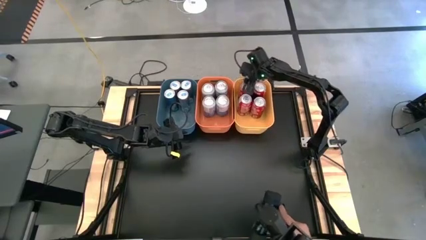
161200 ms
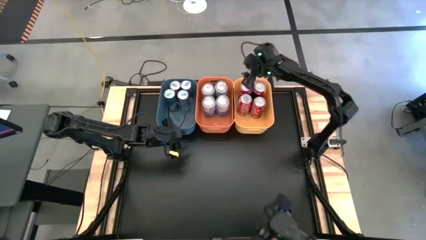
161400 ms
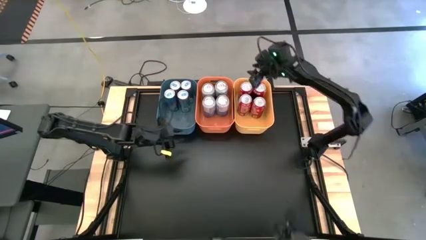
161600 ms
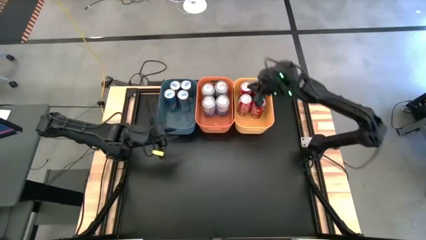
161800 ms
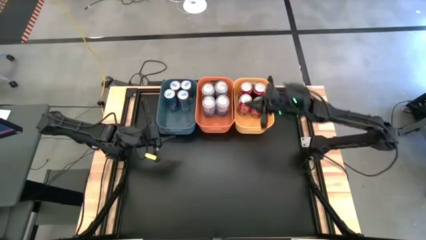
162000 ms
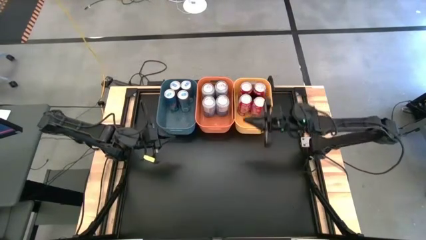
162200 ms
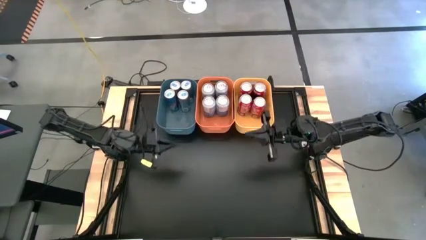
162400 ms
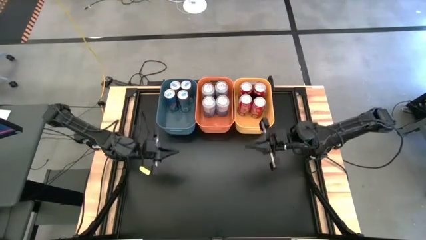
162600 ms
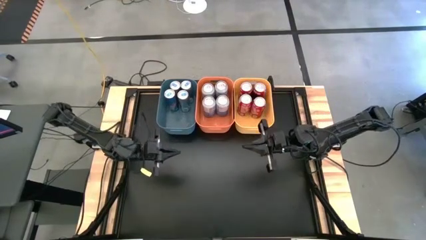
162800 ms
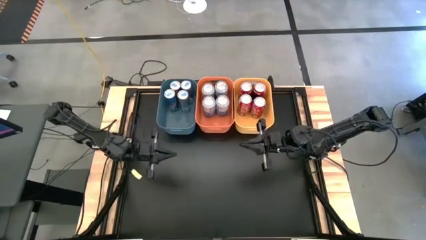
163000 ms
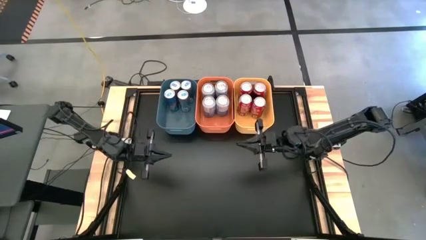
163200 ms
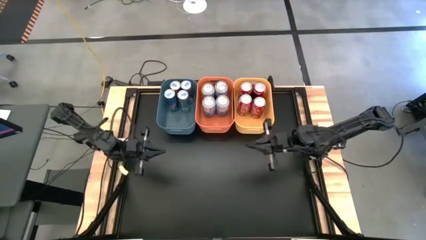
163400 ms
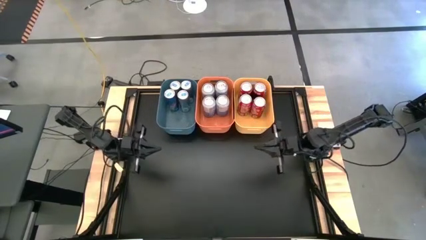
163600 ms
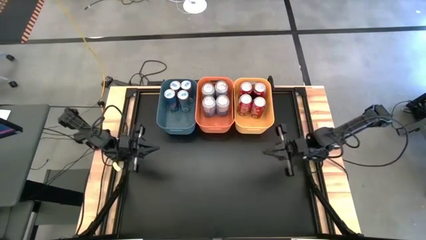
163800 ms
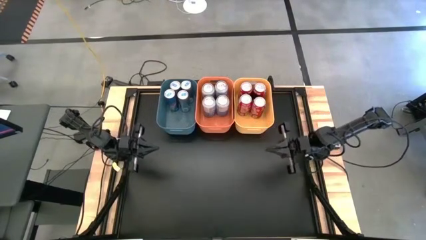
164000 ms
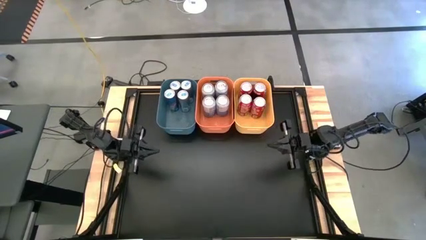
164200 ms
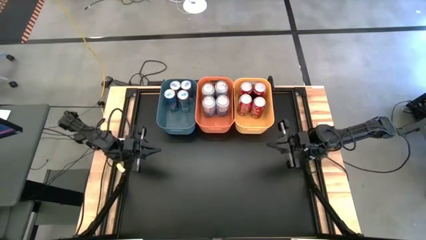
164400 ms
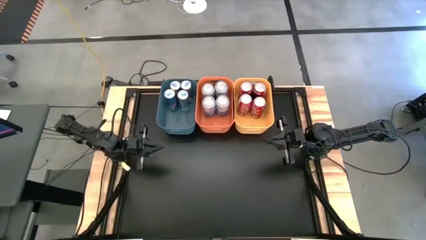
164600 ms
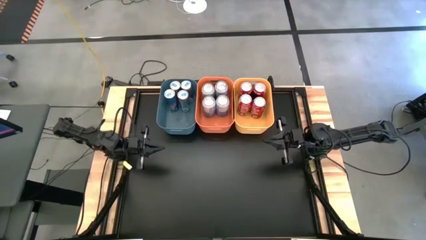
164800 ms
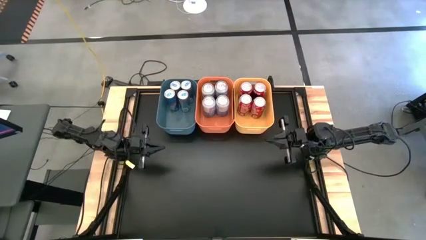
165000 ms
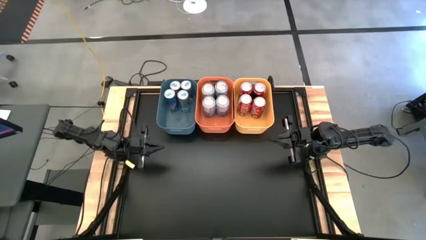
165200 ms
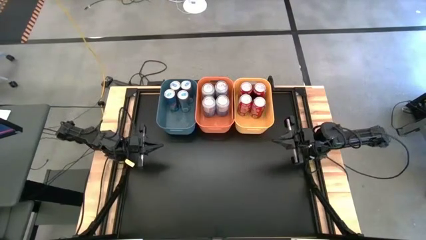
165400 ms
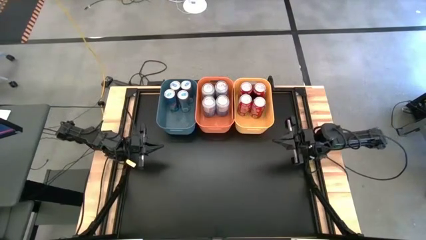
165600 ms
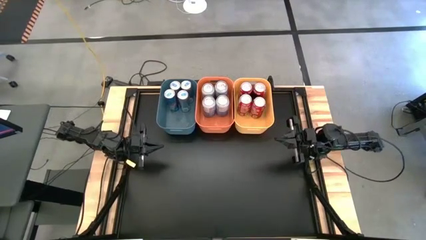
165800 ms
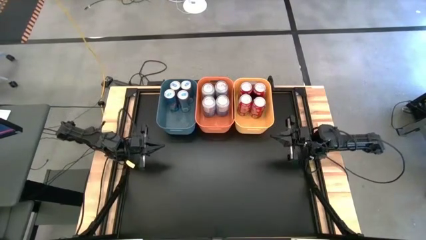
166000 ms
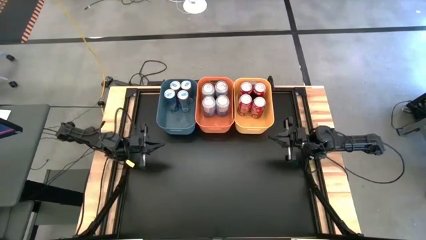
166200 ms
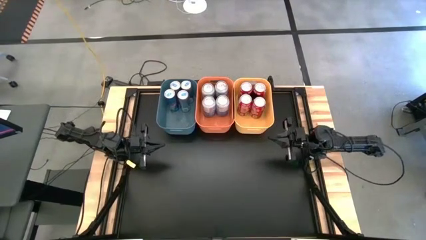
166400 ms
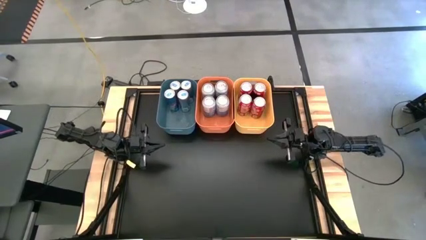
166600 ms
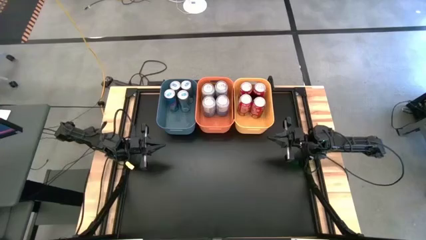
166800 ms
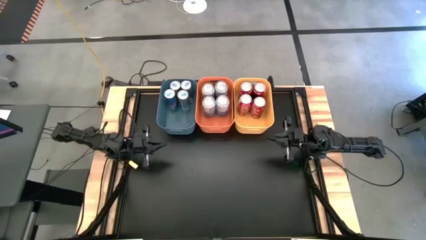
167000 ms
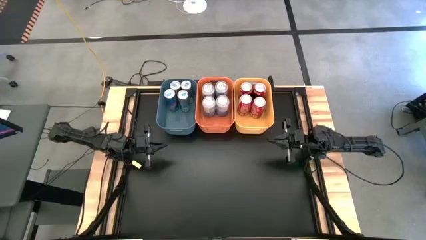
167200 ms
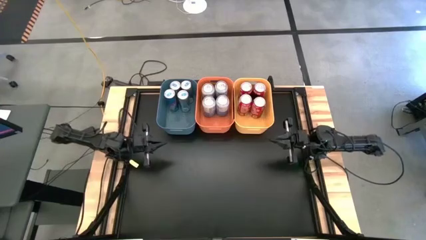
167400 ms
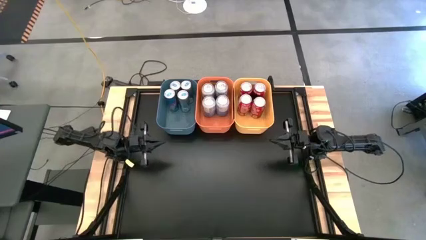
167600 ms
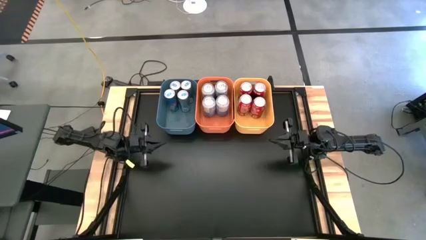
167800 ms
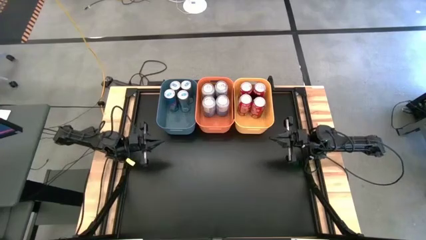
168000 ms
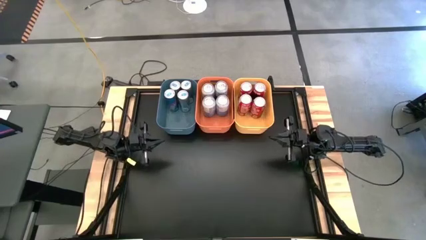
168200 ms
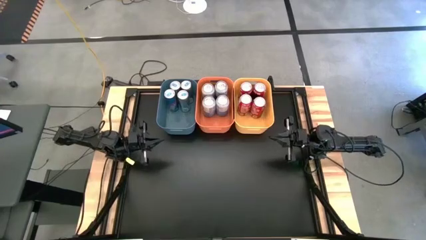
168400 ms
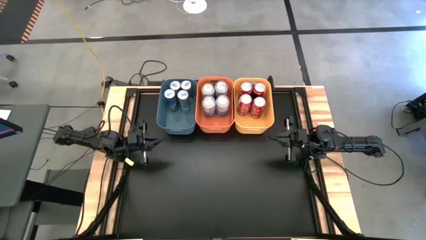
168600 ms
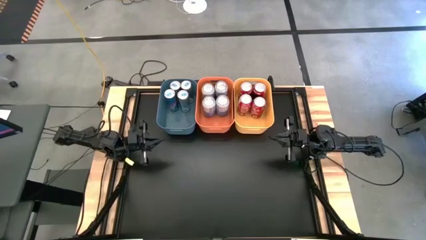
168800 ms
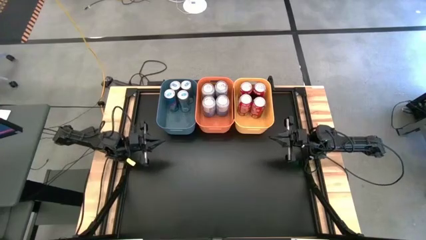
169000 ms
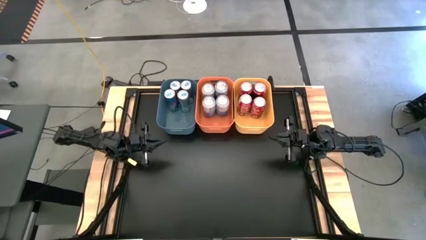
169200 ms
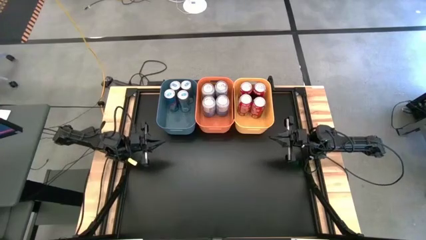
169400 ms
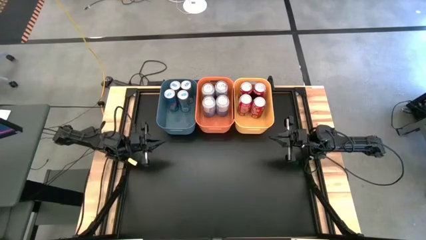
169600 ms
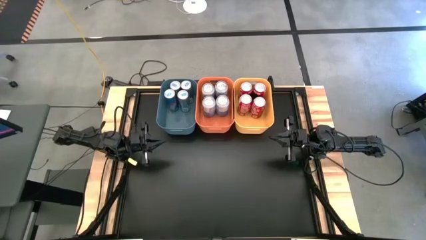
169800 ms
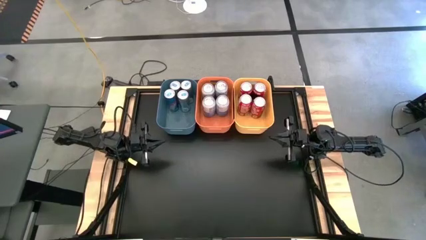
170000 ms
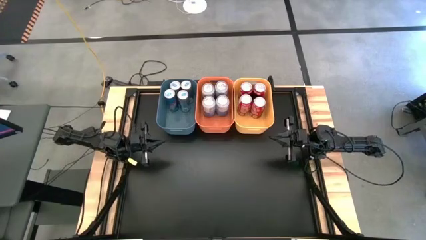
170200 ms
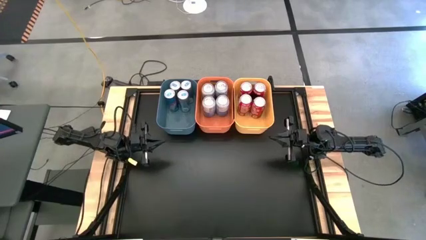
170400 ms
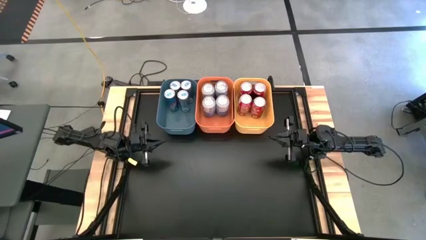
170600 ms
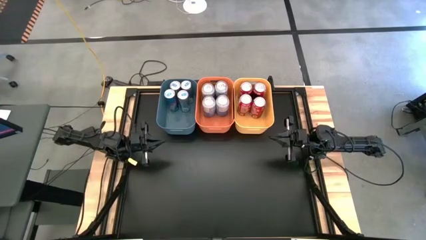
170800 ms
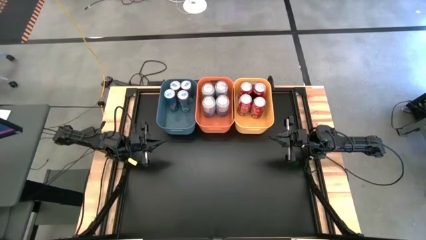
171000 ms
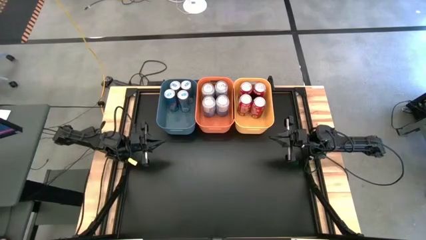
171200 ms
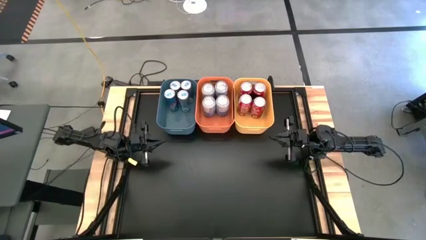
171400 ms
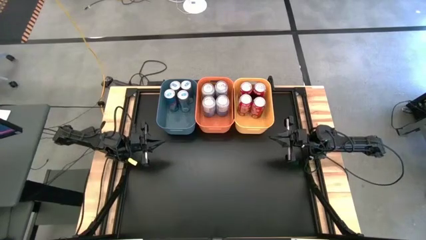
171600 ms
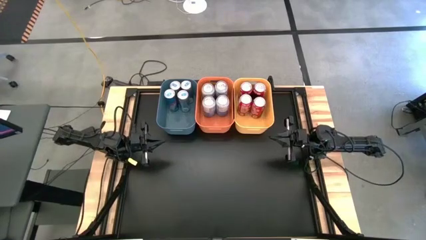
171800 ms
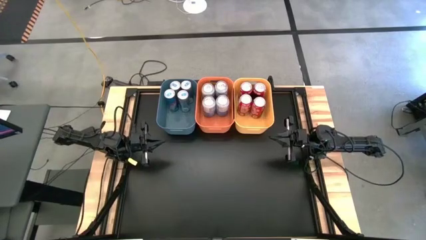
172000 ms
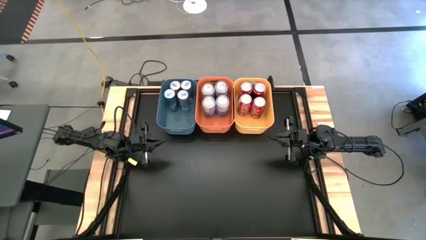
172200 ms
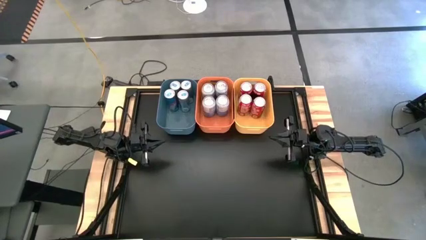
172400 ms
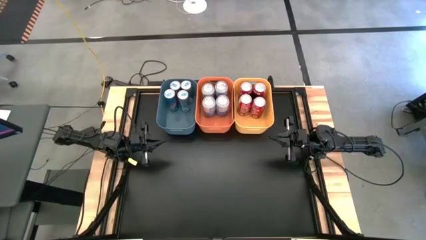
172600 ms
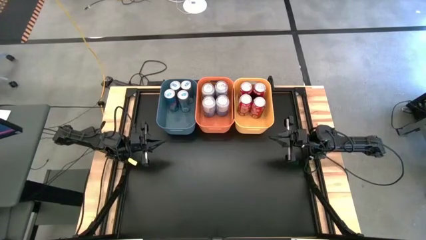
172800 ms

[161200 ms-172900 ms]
Task: Sort soda cans
Return to Home Position
